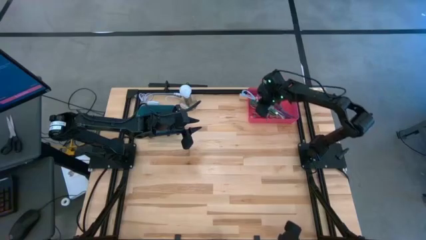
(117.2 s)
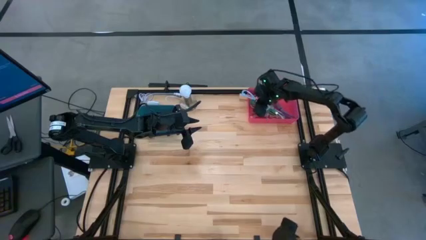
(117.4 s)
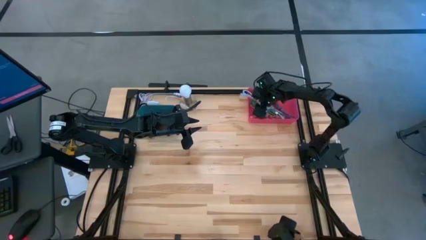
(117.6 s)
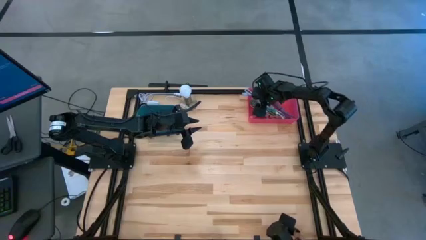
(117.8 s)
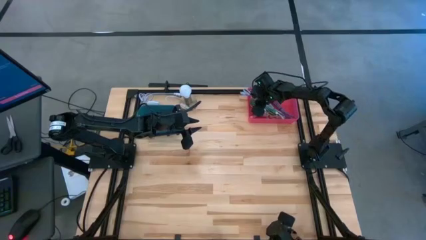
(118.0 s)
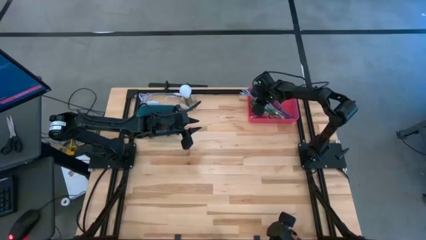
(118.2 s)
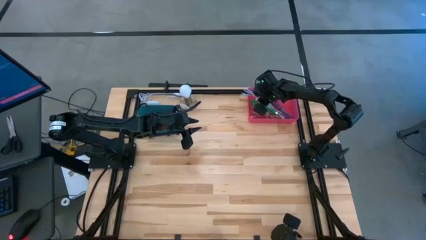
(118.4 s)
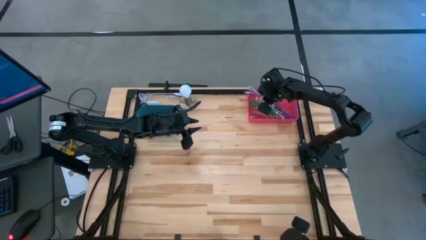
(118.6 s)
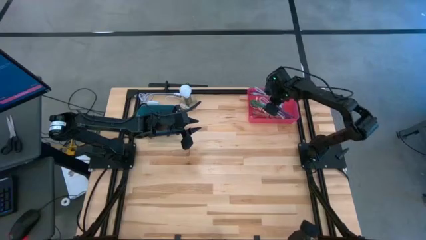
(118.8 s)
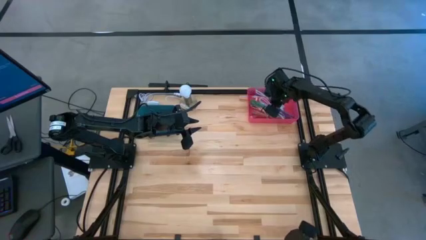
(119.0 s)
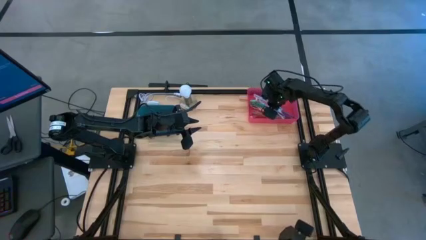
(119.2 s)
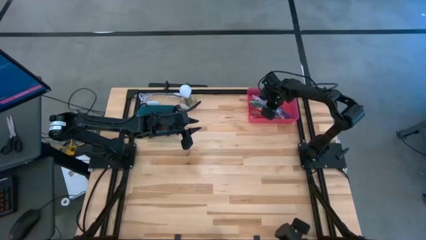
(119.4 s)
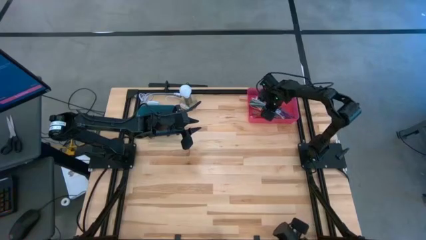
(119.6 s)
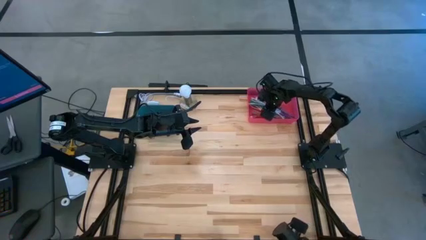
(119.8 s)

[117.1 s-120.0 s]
Task: Pick & Place USB Port
Put the plain light blue charger cable into the pink bin

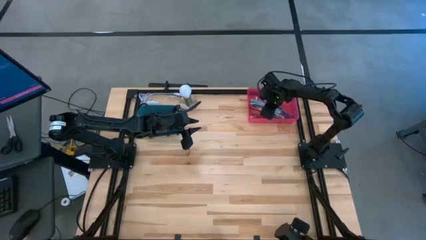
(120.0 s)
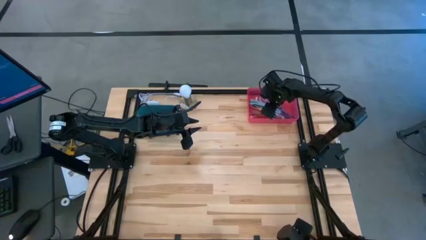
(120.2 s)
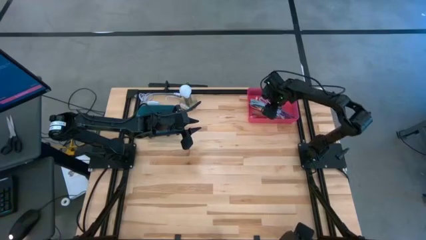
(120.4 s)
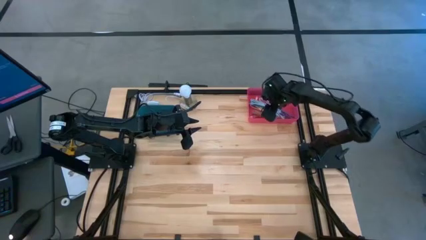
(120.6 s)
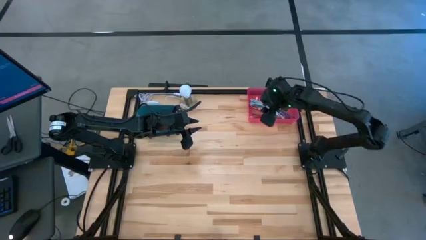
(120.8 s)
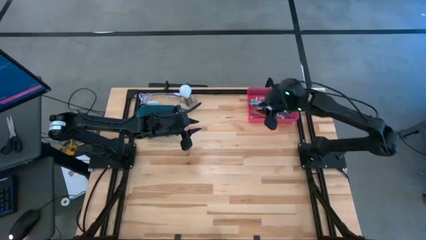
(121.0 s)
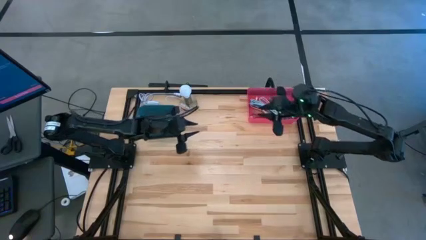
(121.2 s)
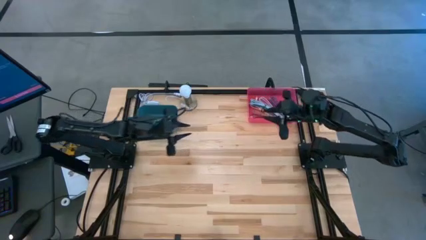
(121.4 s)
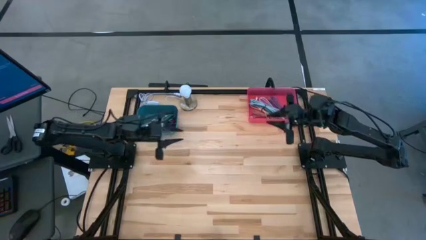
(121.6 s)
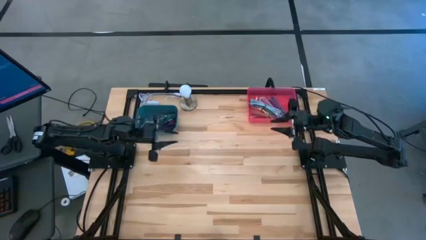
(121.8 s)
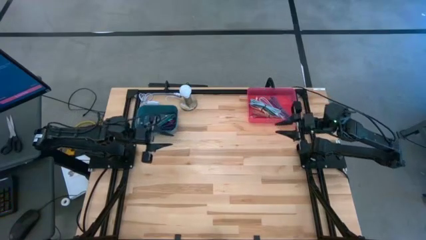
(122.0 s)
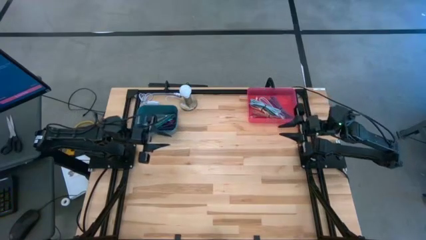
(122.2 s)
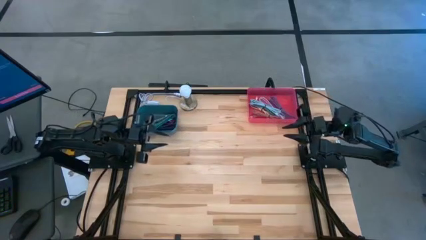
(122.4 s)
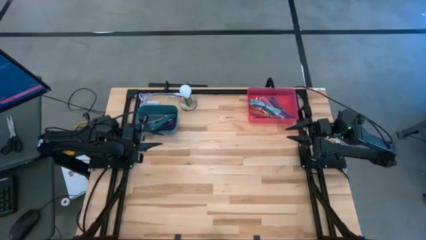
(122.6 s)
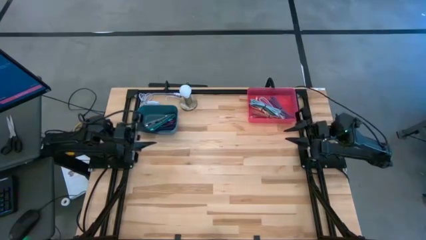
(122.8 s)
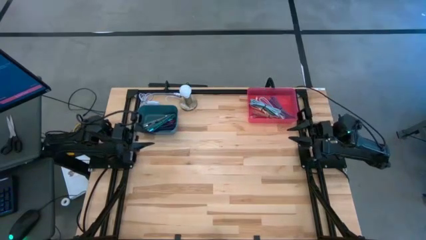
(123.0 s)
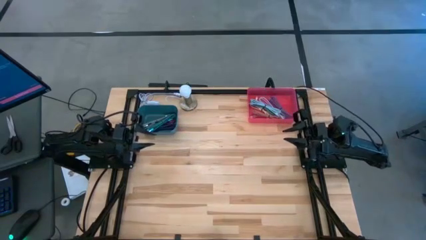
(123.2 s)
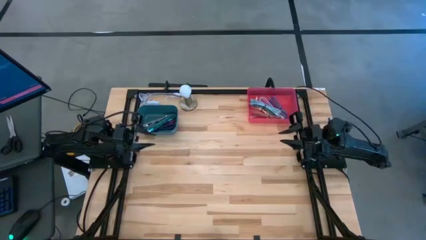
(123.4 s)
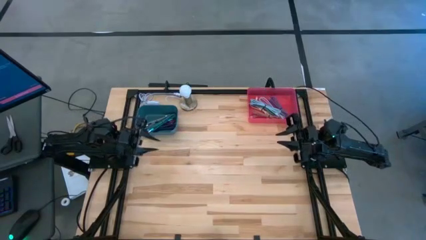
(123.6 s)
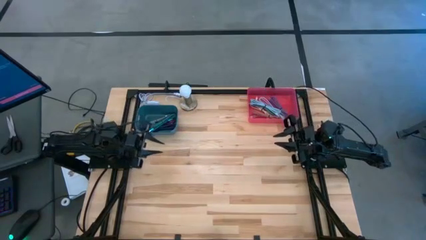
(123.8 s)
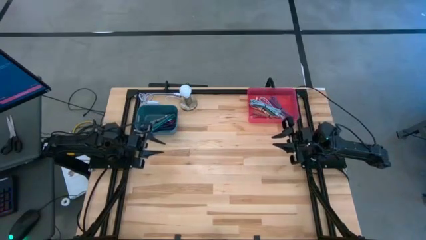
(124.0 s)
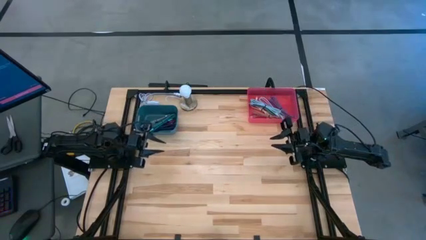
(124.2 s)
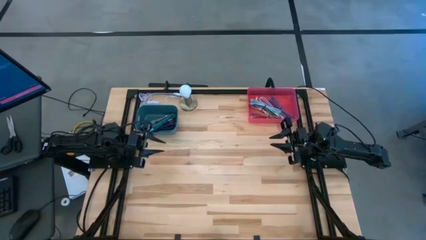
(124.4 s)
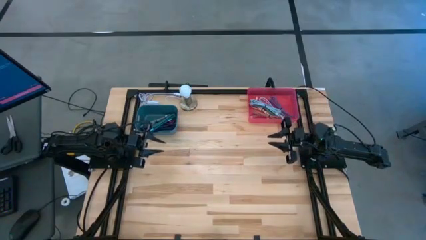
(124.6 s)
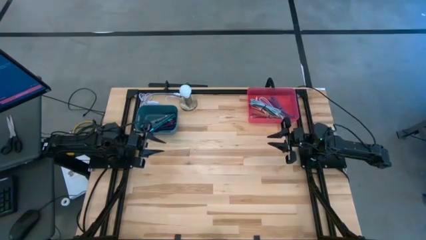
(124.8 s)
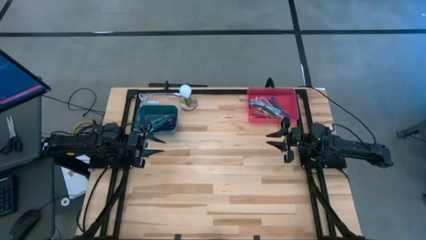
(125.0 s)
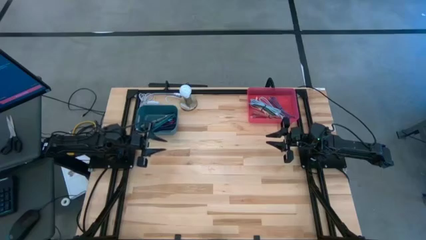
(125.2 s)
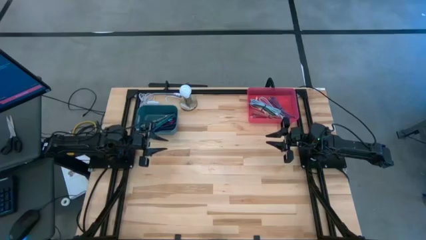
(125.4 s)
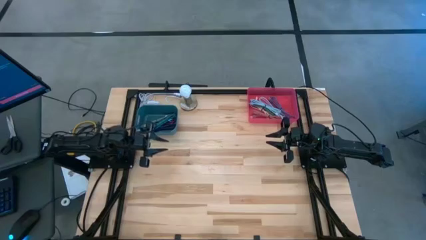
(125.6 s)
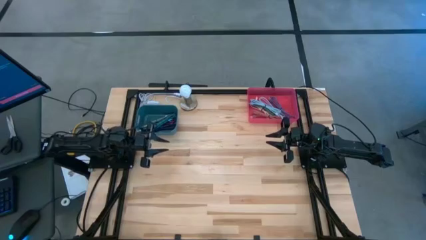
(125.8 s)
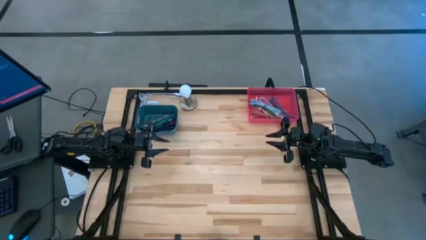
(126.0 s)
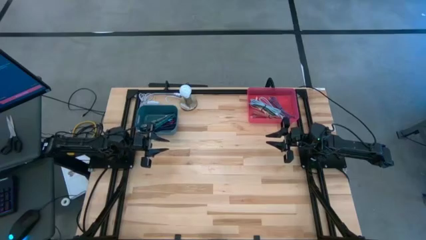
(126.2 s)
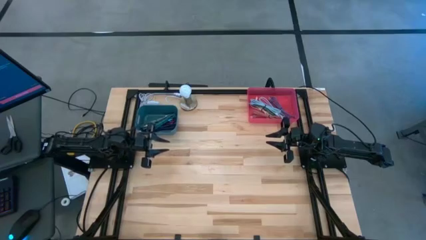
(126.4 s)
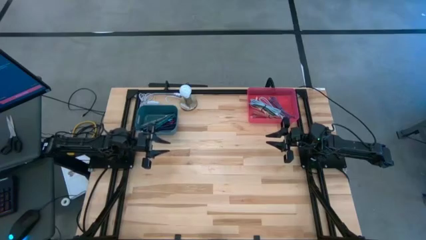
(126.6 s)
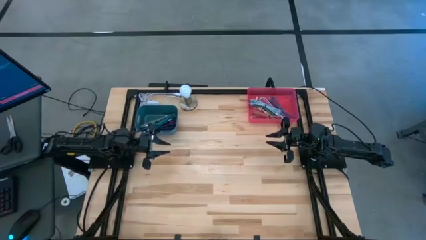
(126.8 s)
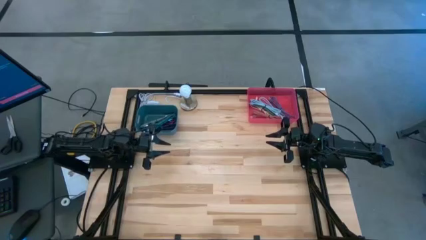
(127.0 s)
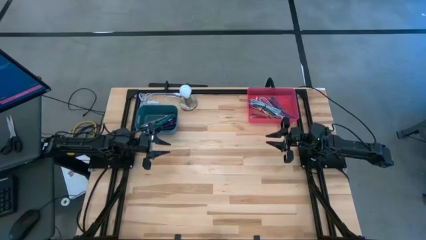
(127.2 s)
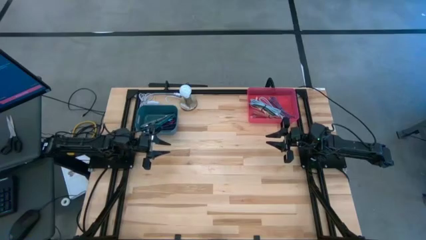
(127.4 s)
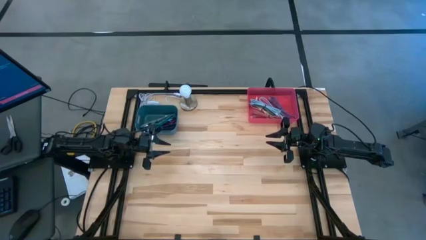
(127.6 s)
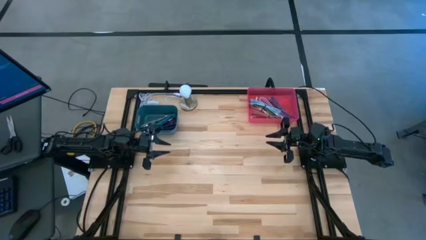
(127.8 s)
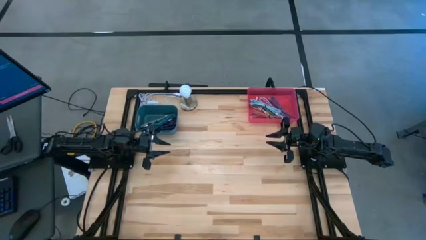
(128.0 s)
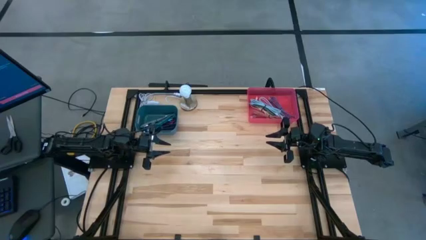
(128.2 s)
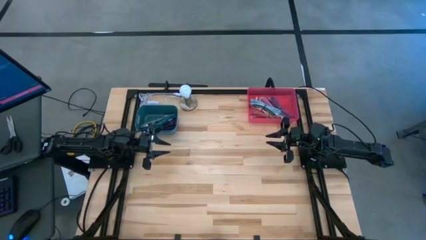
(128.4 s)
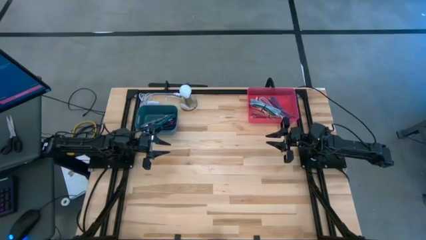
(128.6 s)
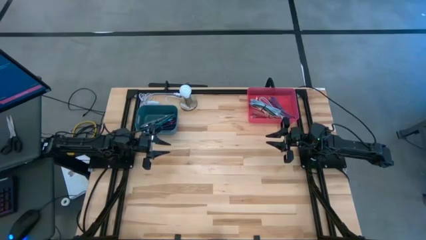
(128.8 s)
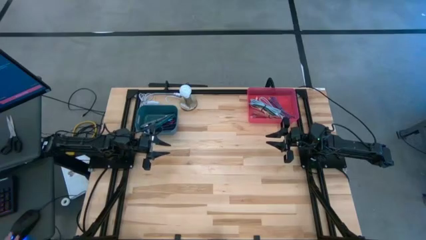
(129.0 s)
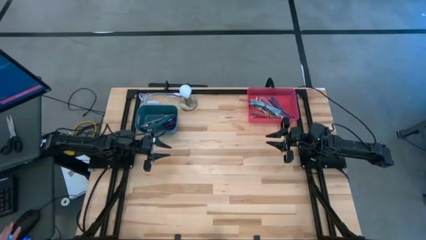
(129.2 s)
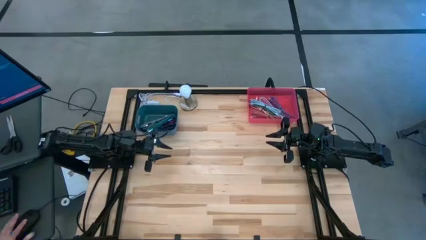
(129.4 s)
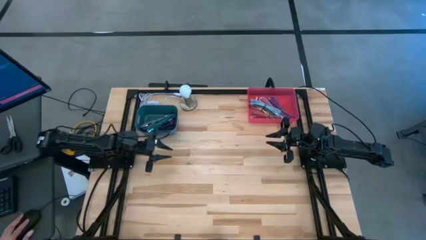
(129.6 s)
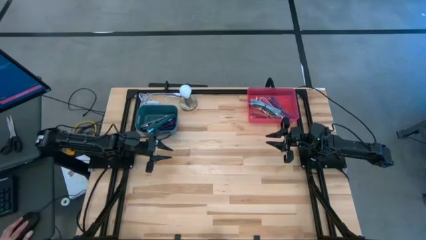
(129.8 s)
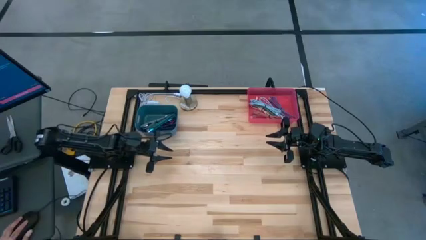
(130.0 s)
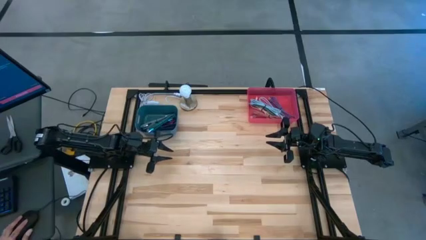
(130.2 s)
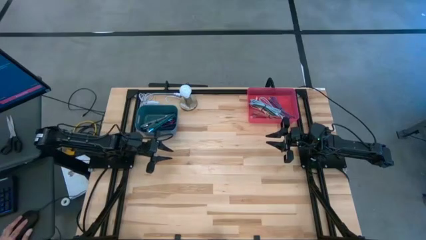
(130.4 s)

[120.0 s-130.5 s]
Return to Home Position

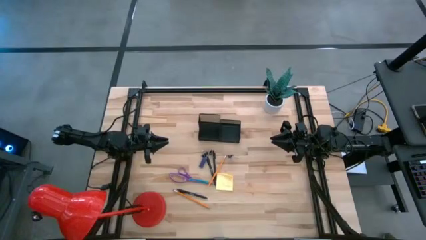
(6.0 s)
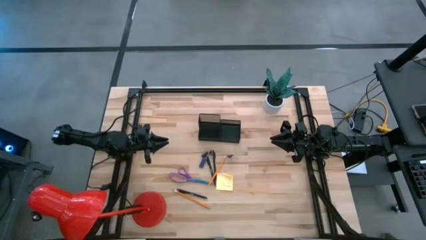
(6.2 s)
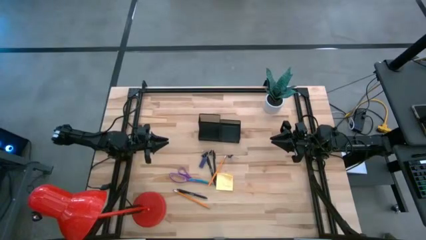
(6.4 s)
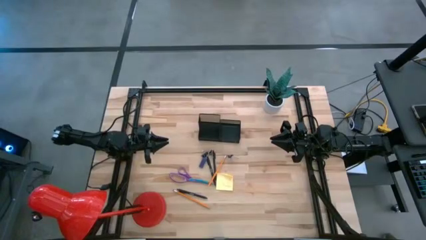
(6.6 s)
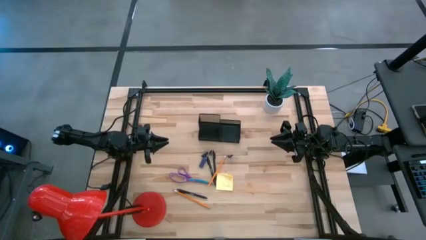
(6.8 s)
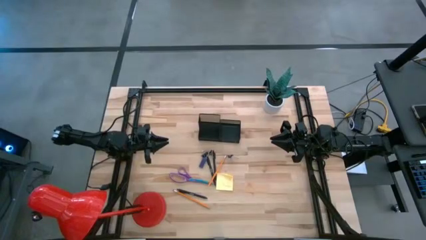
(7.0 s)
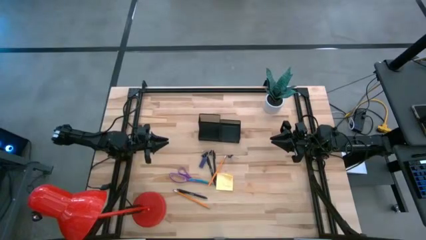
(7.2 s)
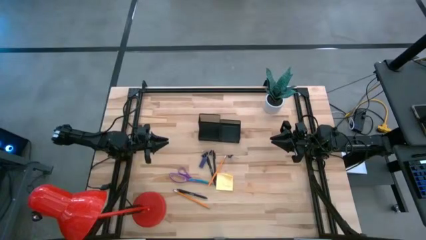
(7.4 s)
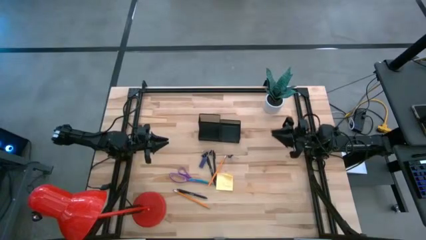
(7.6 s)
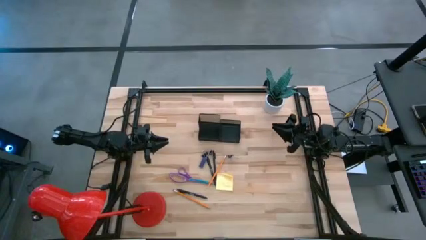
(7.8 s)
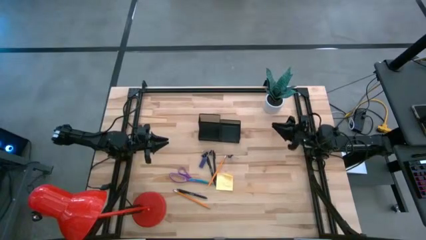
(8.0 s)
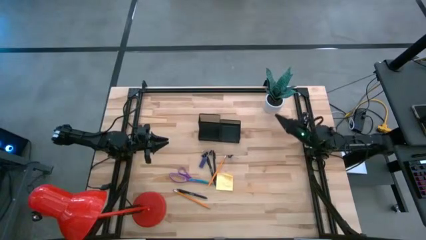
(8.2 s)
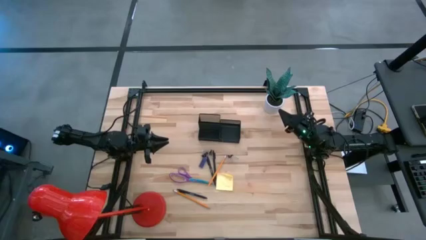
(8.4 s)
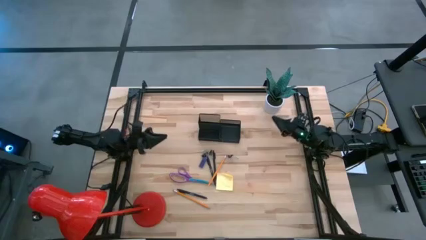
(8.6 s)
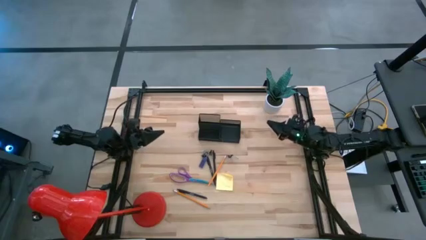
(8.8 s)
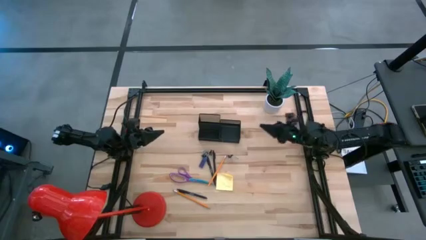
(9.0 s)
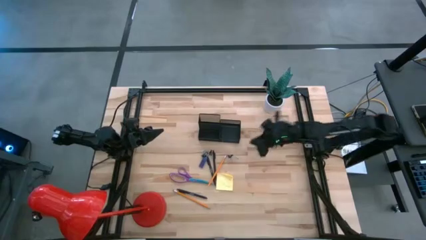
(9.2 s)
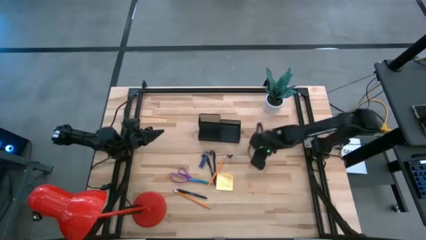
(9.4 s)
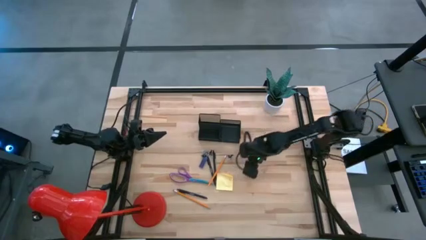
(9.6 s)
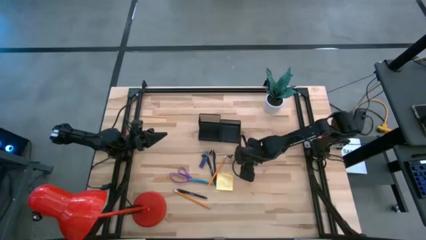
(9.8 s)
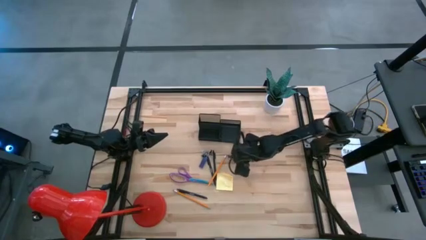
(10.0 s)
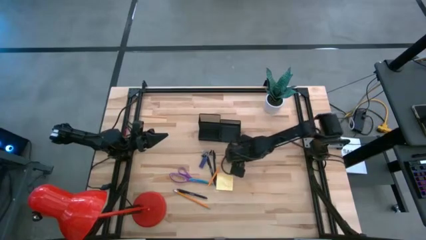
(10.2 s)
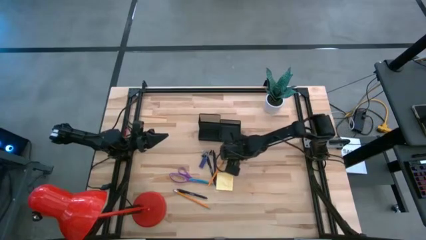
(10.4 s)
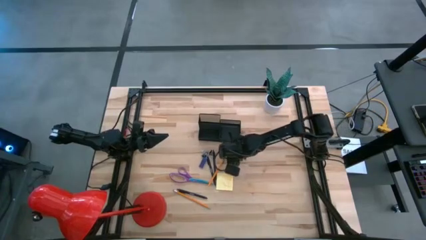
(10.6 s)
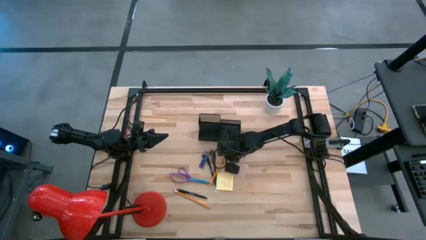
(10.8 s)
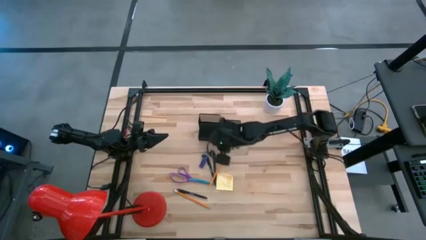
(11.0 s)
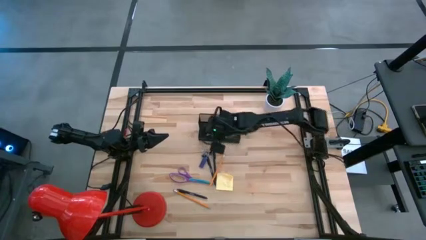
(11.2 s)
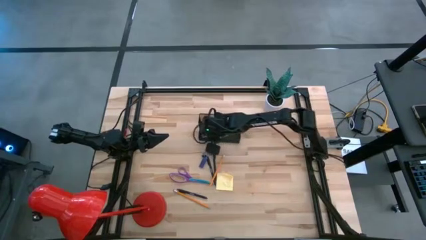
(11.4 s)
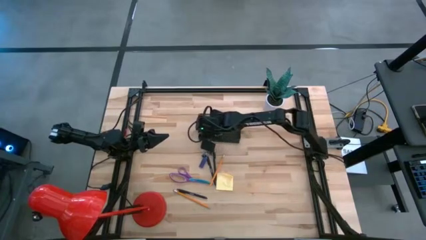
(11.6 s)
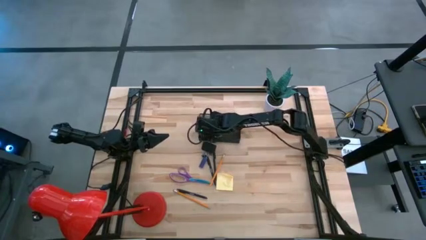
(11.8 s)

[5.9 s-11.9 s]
Task: Pick and place office supplies into organizer
Put the right black binder clip into the desk organizer
